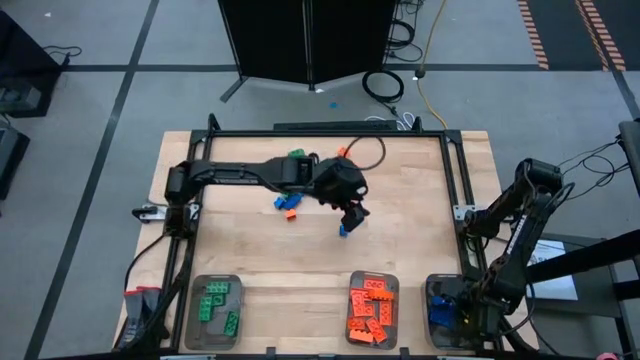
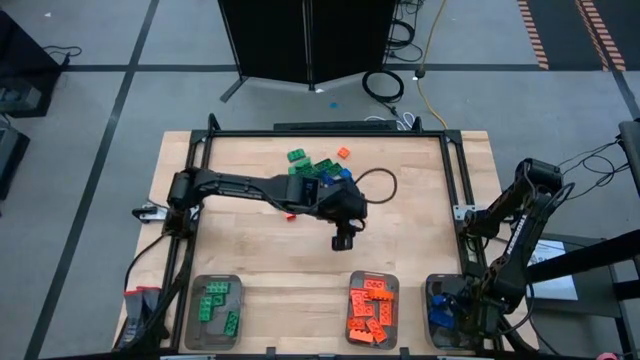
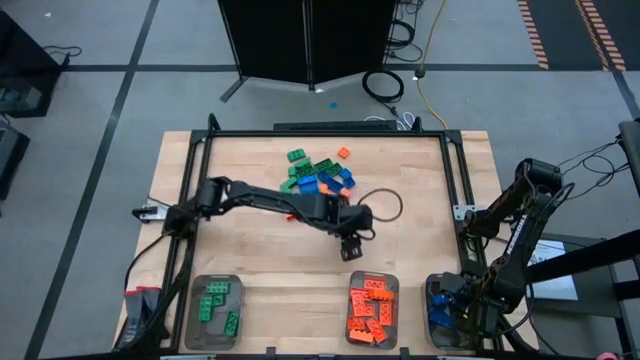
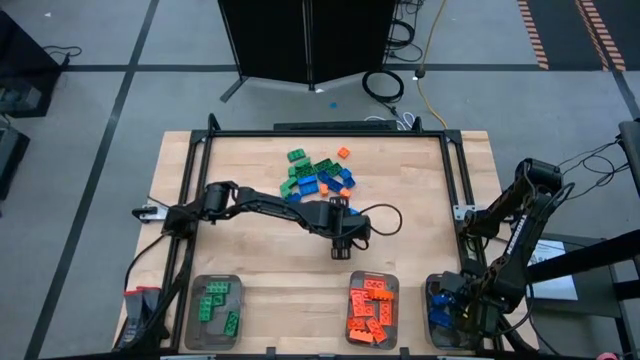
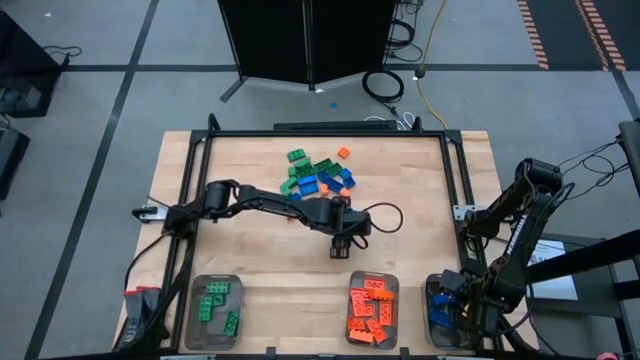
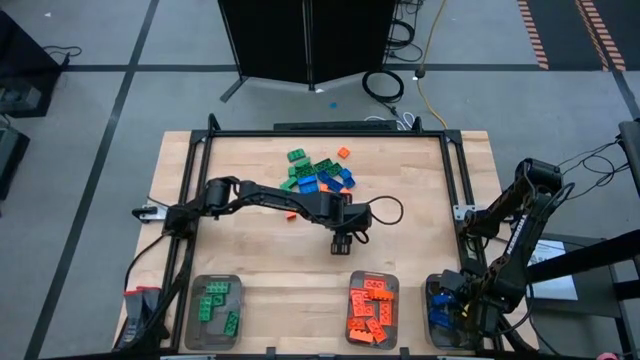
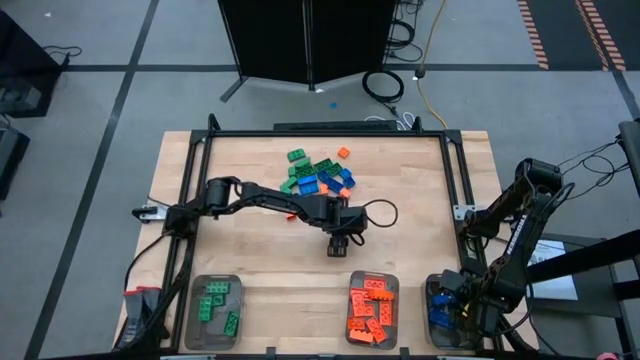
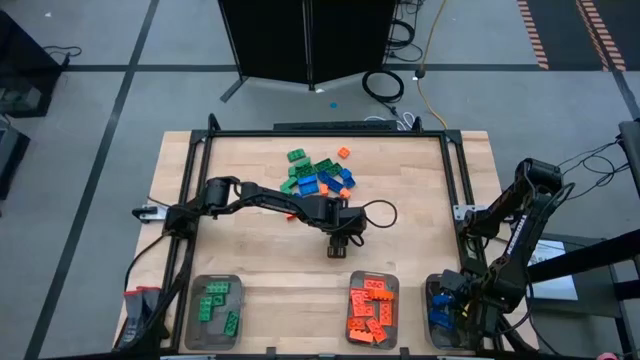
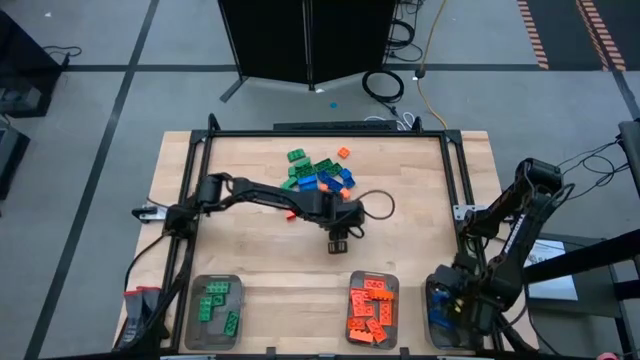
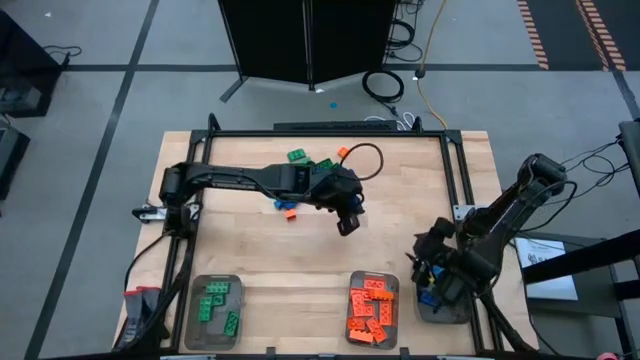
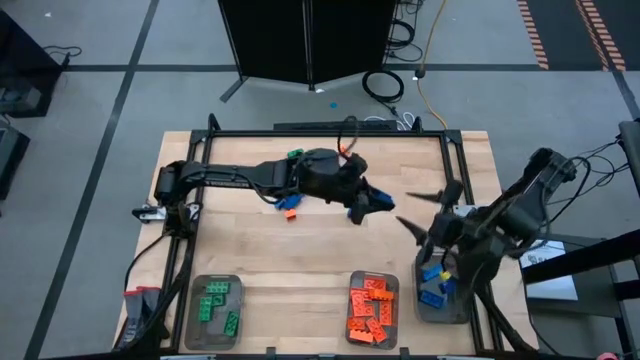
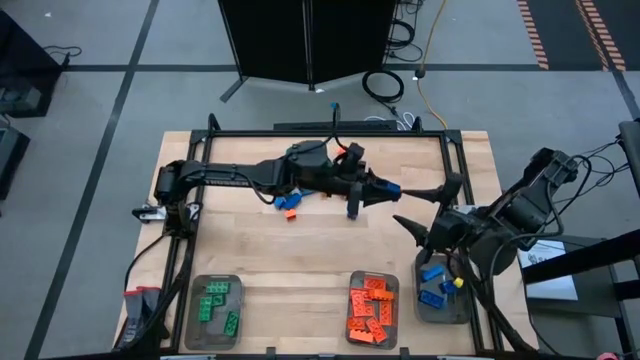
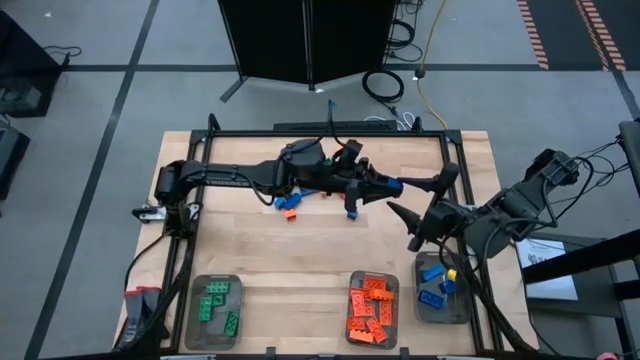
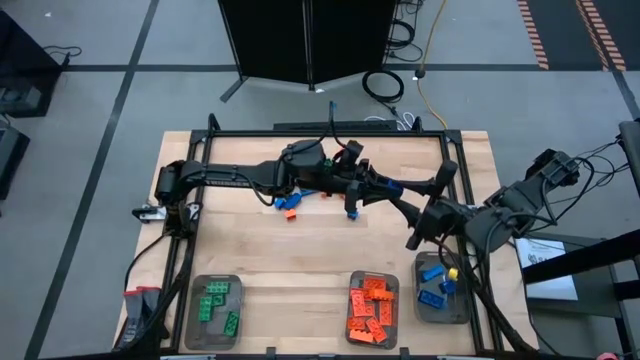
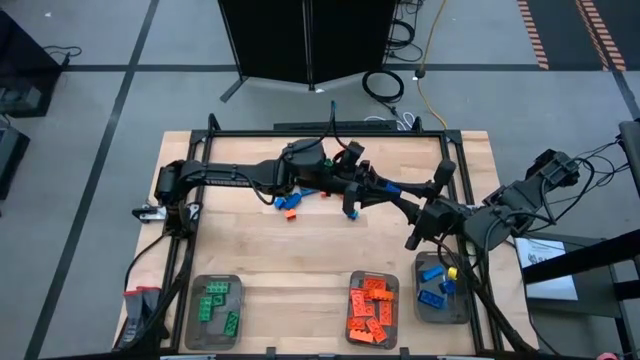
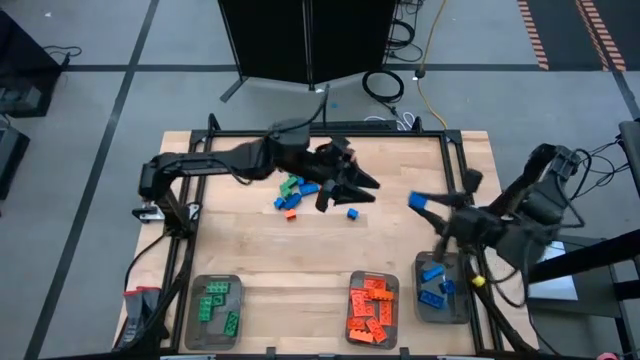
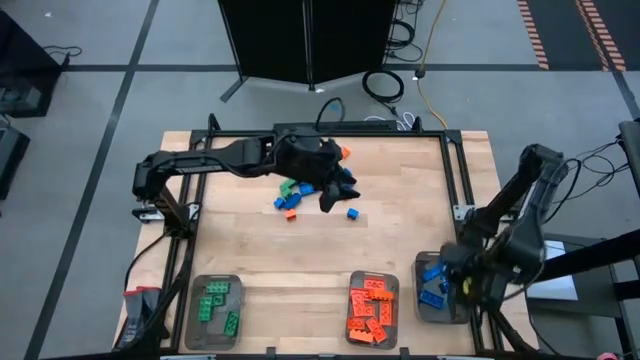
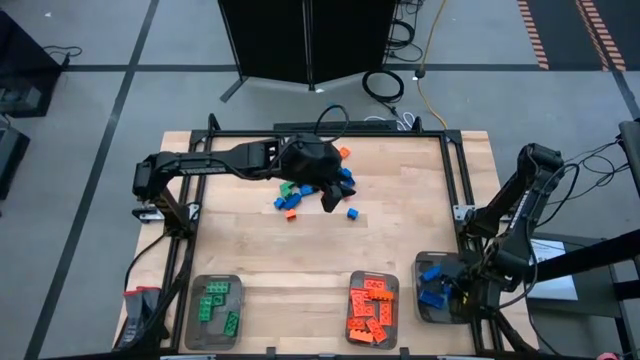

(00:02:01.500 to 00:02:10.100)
Task: Sort blocks
Put the blue game piece into the right black bin

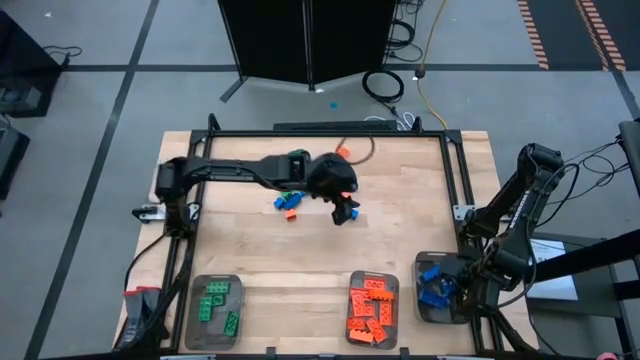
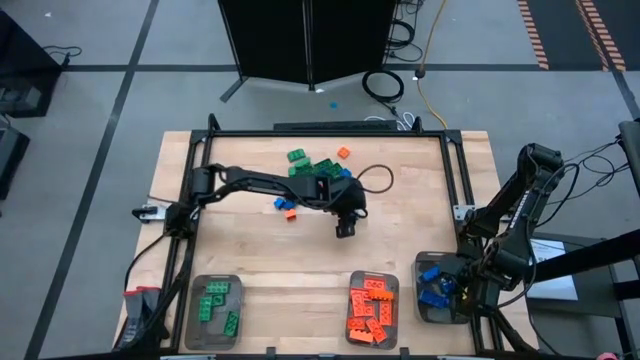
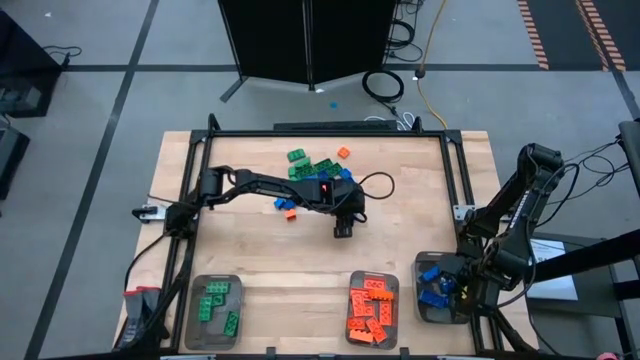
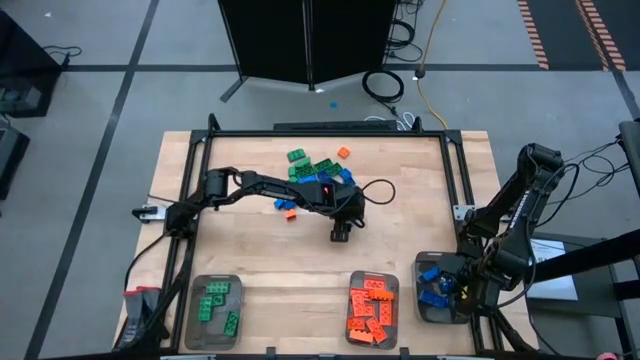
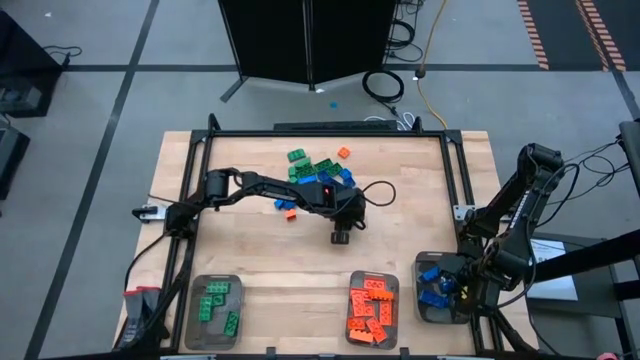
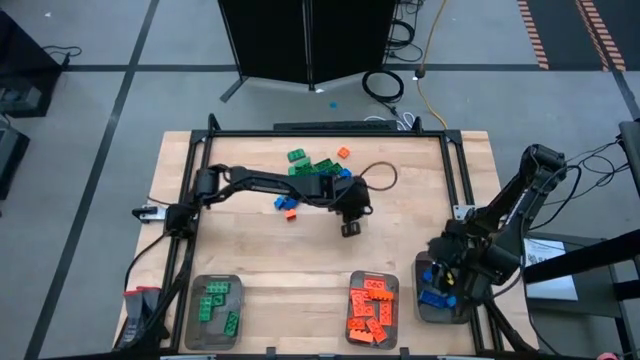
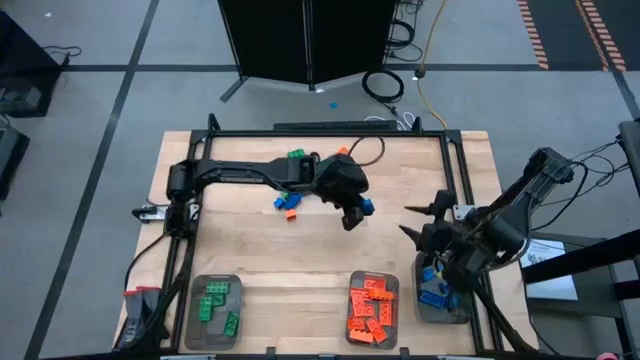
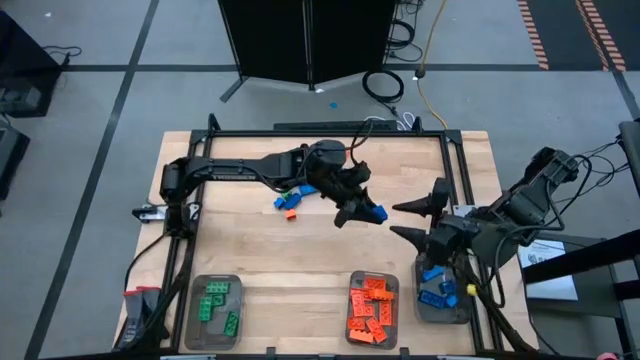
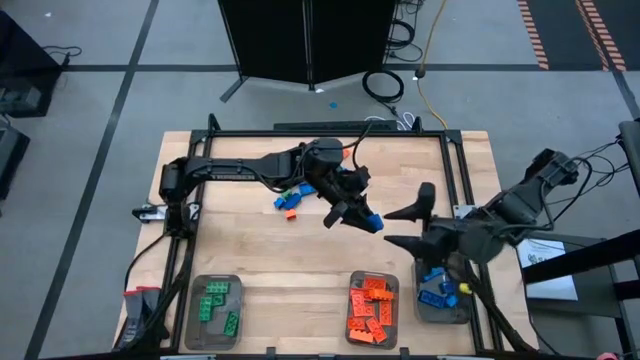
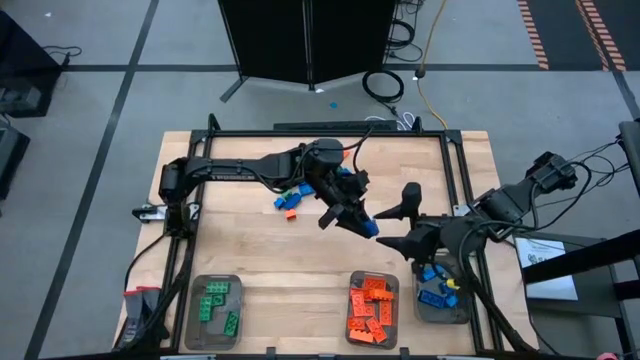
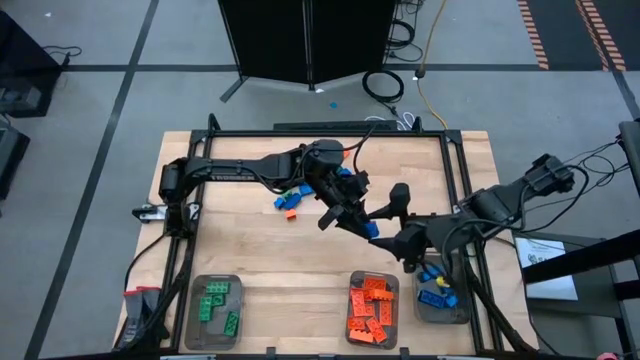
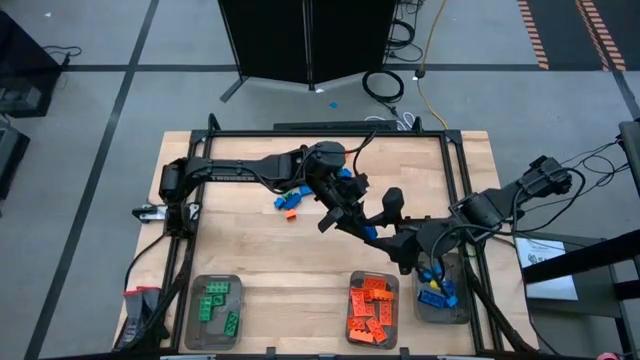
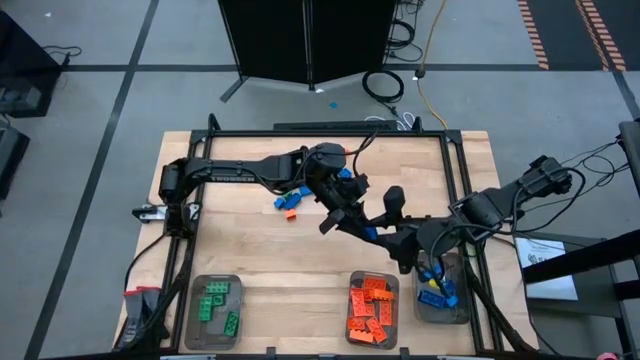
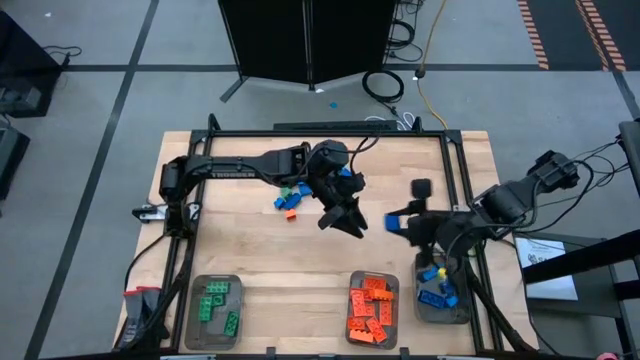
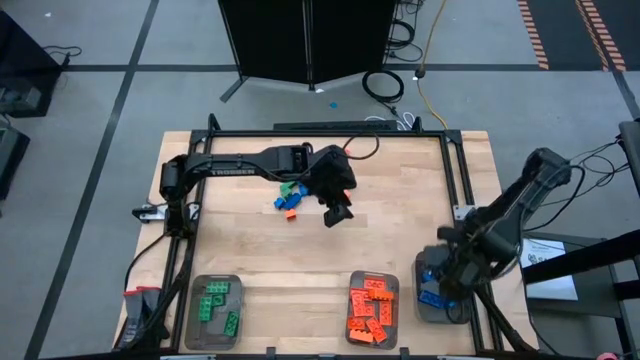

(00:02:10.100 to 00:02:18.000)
Put the blue game piece into the right black bin

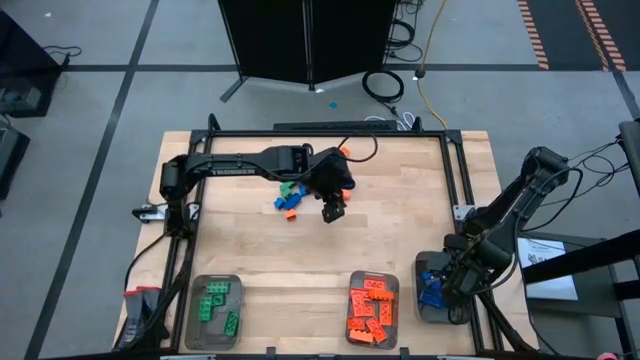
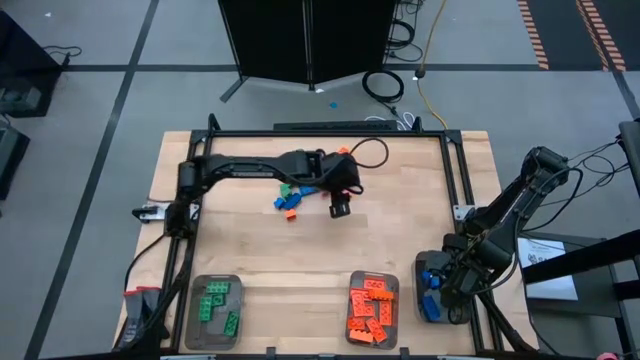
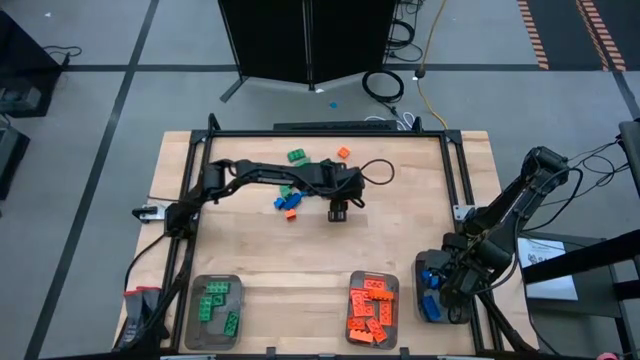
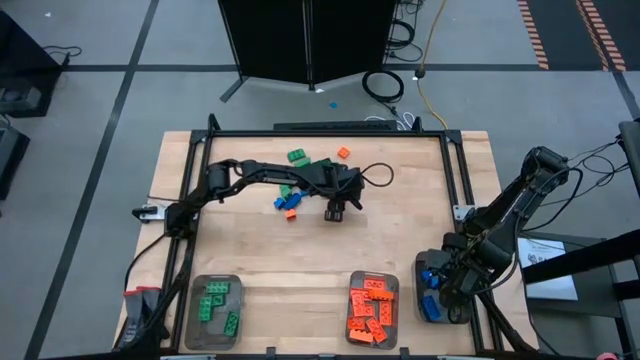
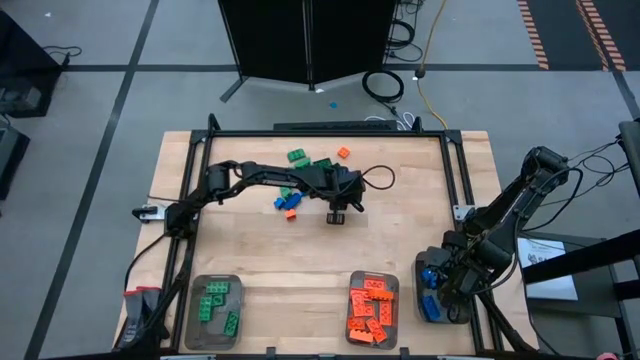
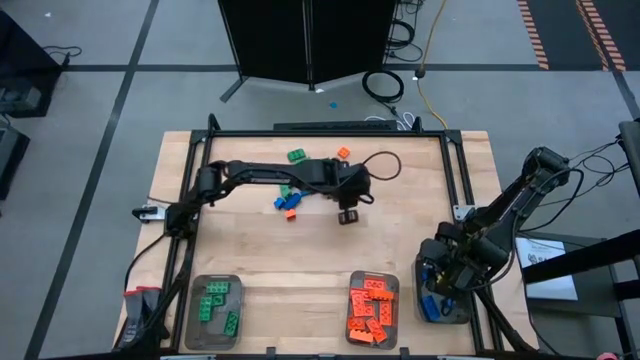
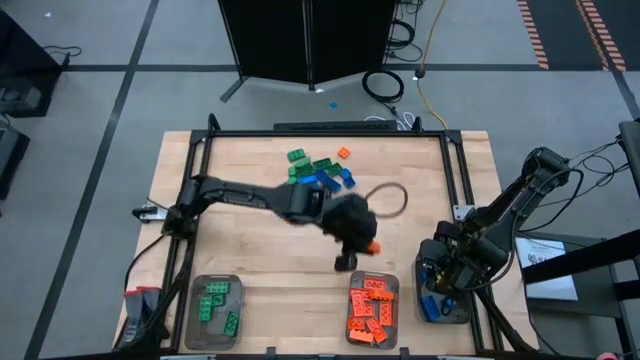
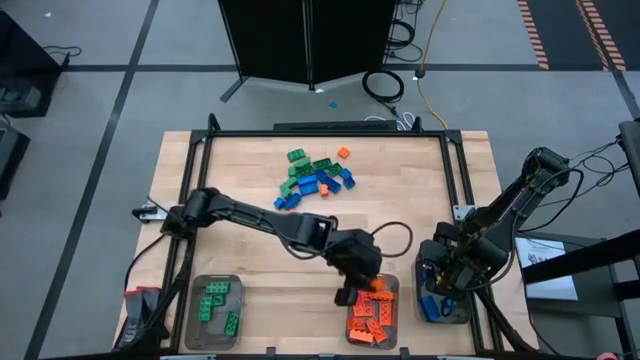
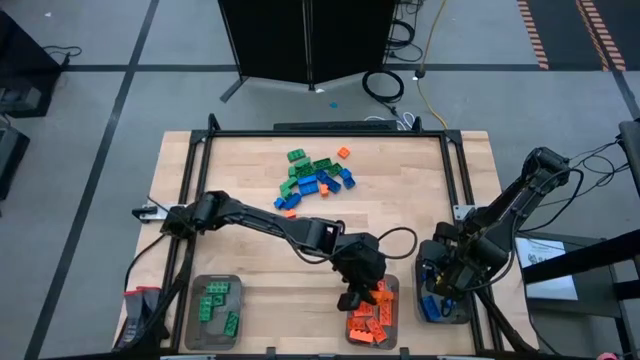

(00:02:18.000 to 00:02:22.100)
Put the orange game piece into the center black bin
